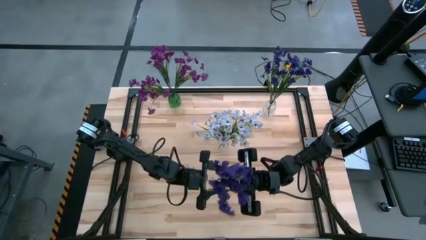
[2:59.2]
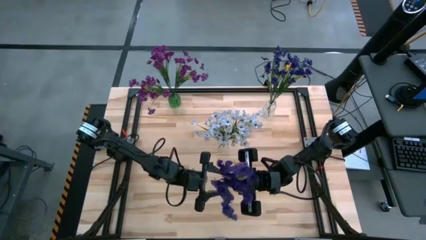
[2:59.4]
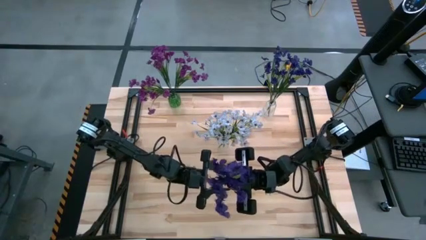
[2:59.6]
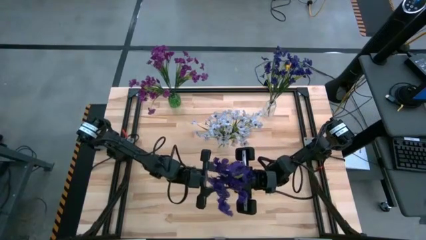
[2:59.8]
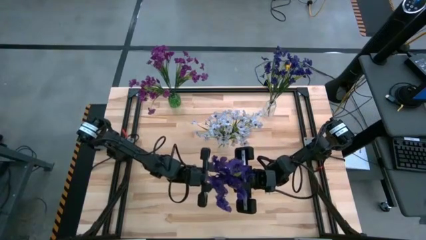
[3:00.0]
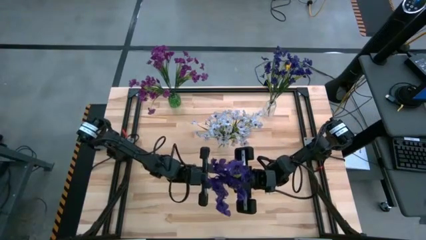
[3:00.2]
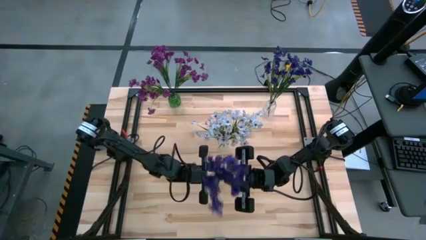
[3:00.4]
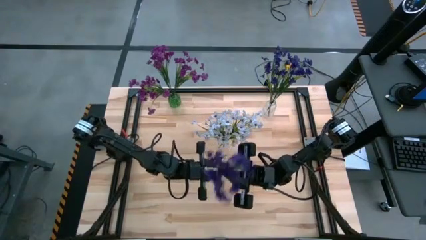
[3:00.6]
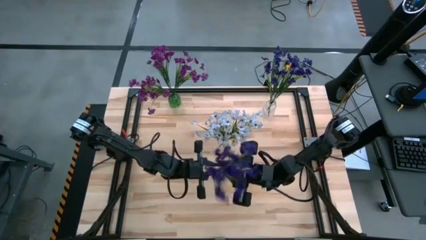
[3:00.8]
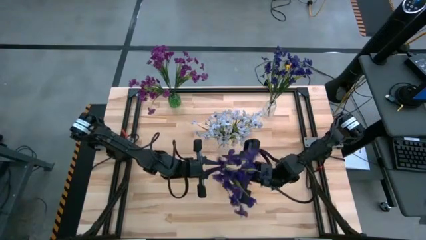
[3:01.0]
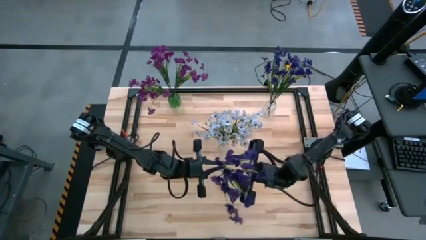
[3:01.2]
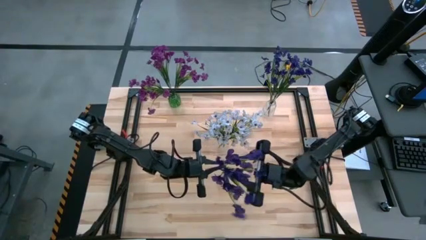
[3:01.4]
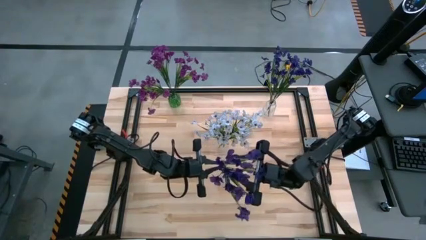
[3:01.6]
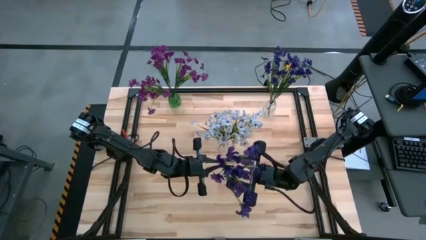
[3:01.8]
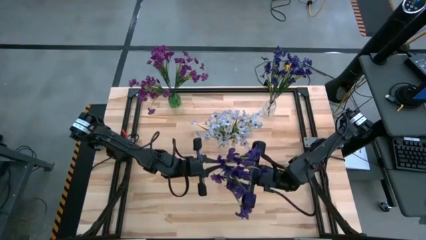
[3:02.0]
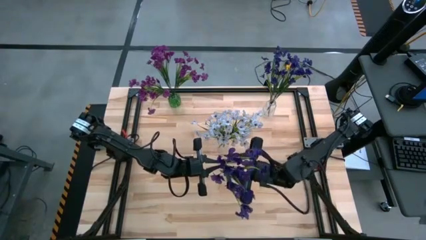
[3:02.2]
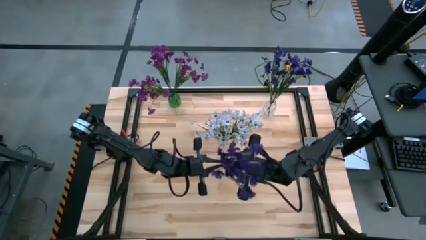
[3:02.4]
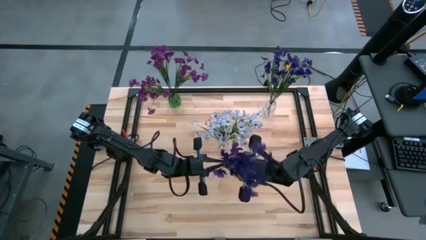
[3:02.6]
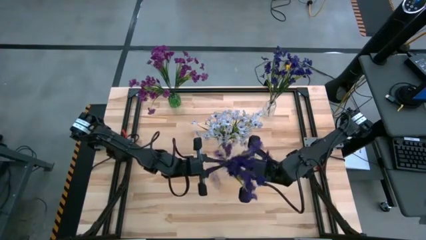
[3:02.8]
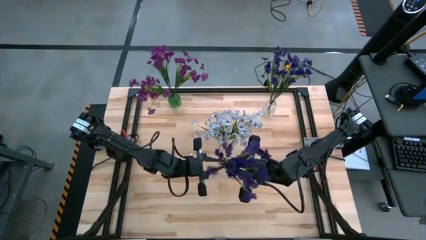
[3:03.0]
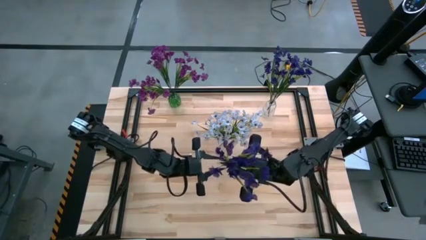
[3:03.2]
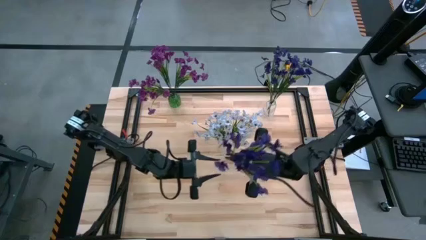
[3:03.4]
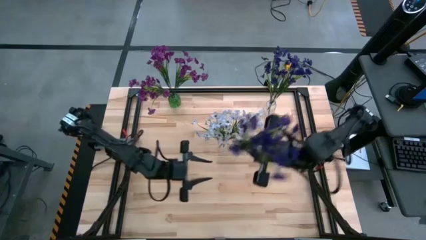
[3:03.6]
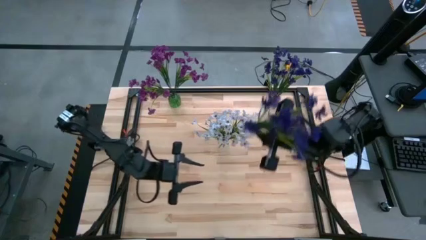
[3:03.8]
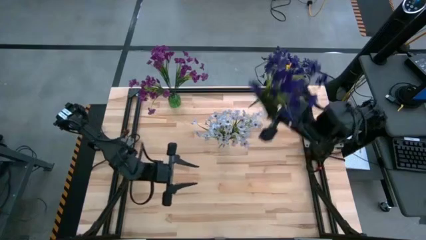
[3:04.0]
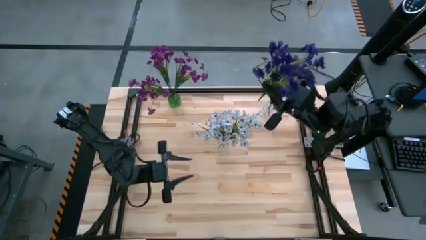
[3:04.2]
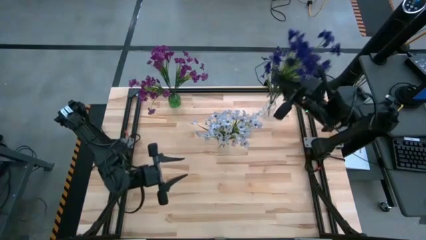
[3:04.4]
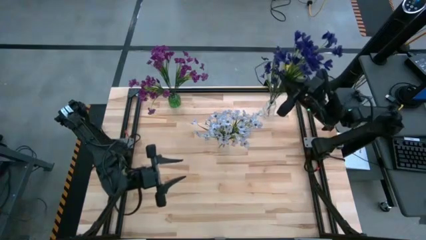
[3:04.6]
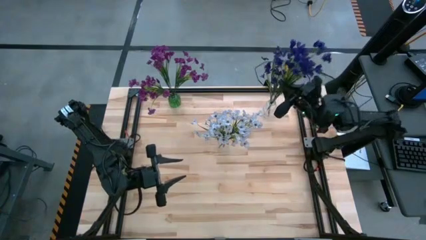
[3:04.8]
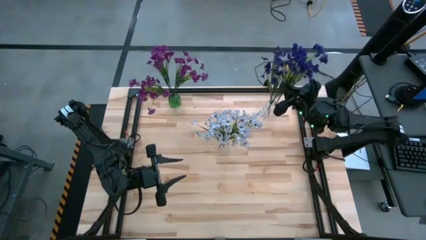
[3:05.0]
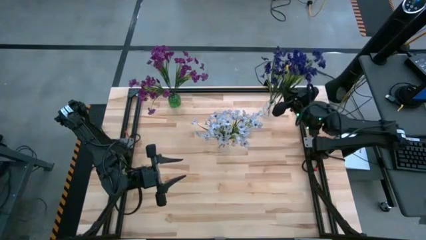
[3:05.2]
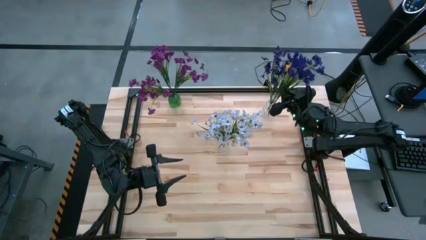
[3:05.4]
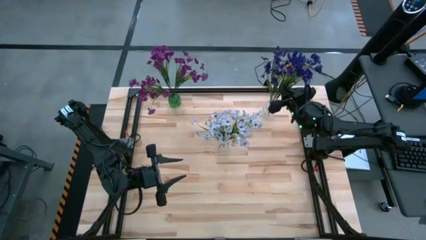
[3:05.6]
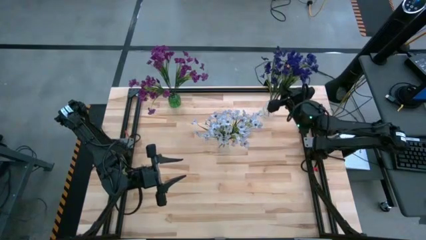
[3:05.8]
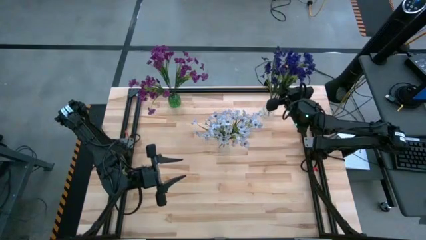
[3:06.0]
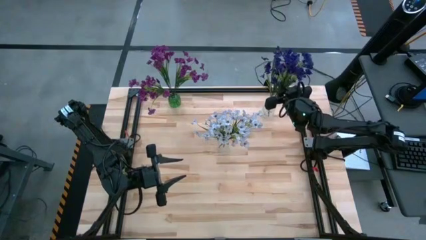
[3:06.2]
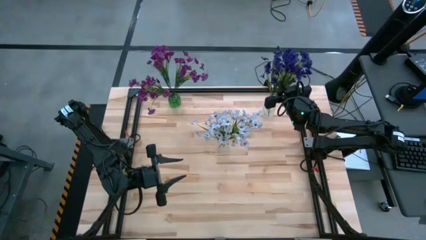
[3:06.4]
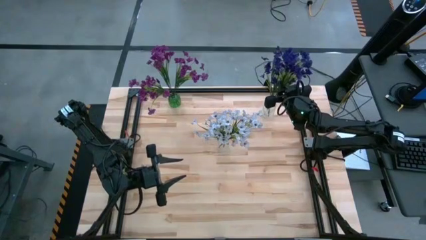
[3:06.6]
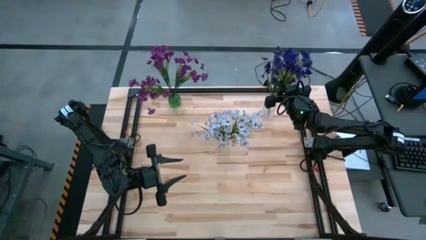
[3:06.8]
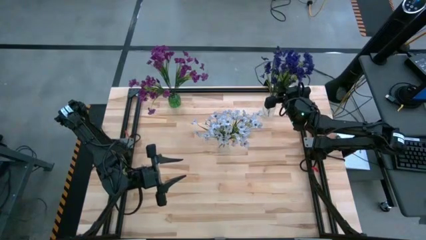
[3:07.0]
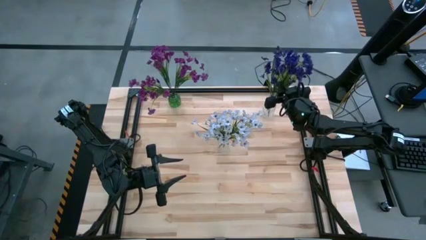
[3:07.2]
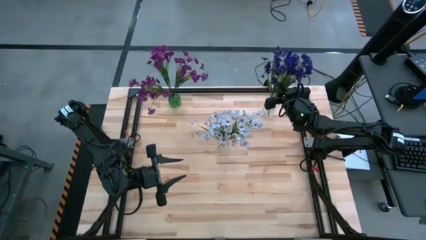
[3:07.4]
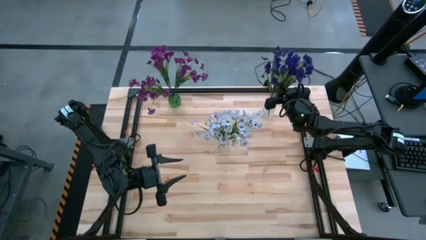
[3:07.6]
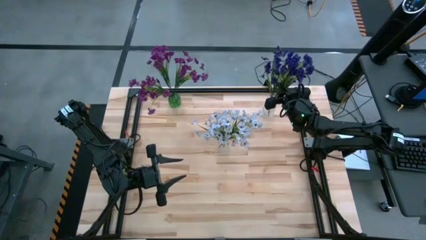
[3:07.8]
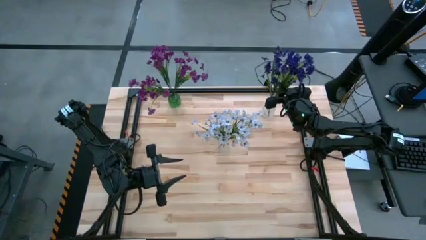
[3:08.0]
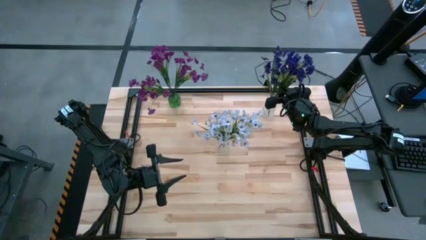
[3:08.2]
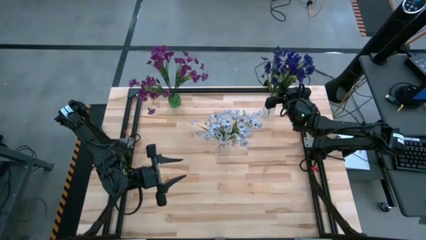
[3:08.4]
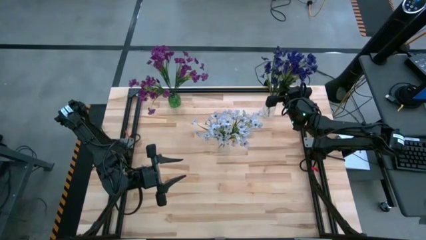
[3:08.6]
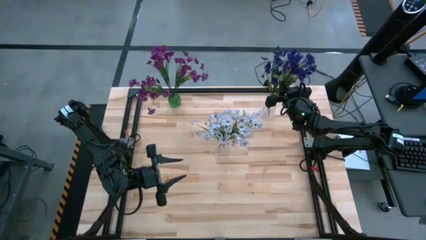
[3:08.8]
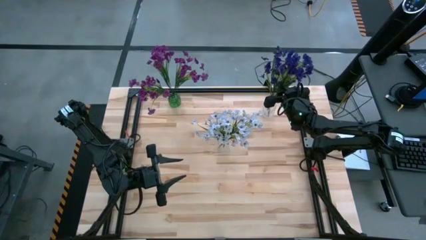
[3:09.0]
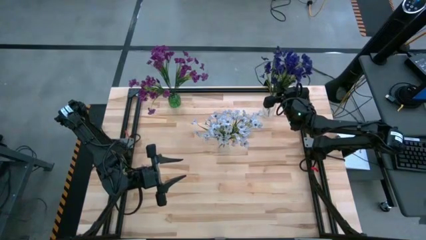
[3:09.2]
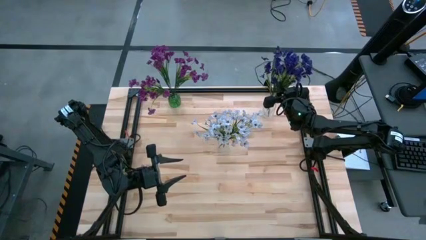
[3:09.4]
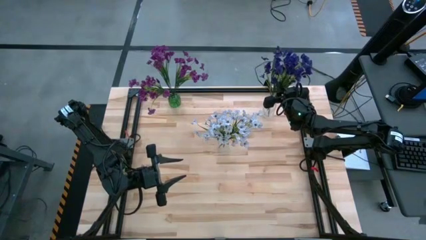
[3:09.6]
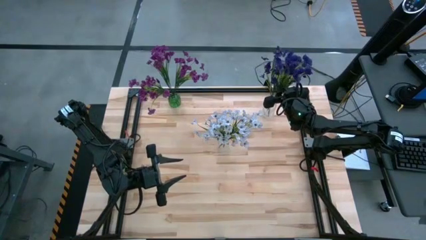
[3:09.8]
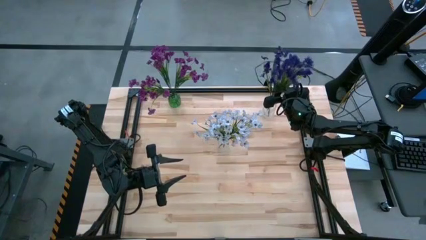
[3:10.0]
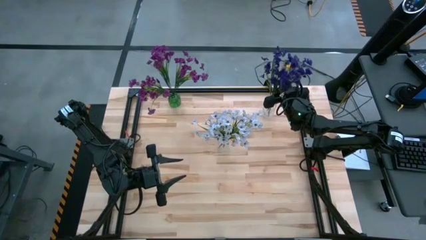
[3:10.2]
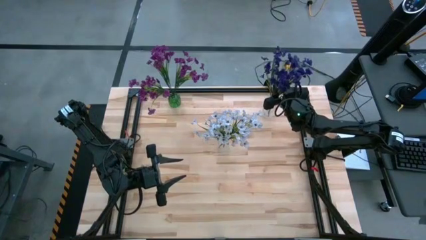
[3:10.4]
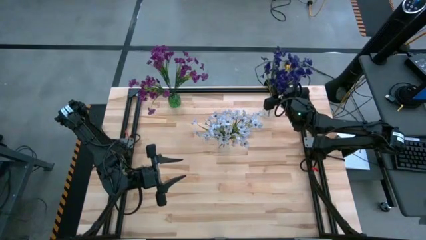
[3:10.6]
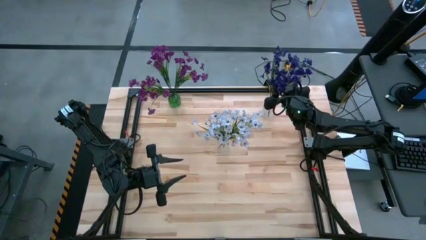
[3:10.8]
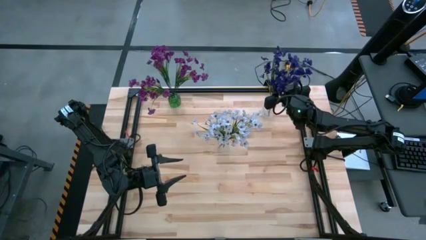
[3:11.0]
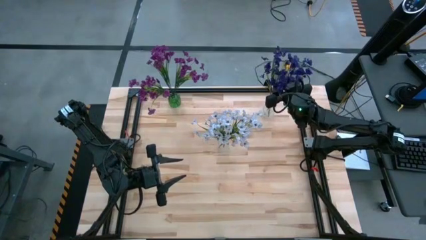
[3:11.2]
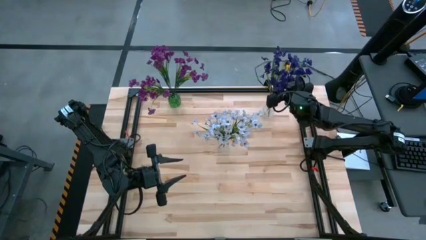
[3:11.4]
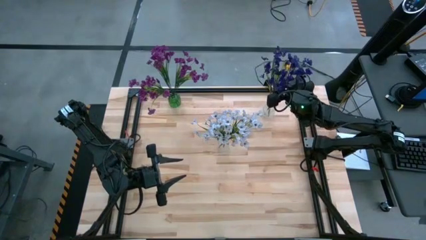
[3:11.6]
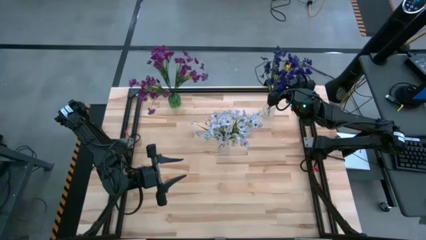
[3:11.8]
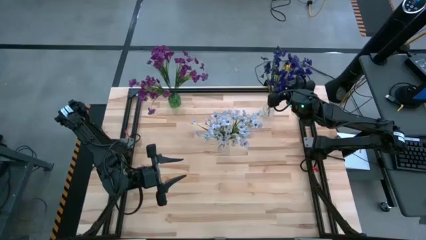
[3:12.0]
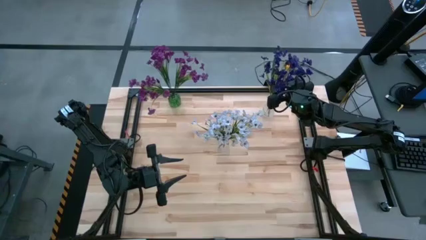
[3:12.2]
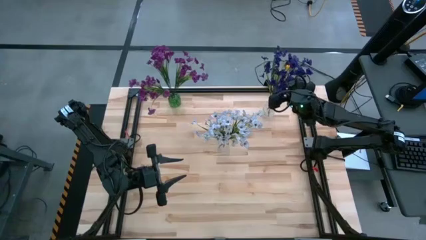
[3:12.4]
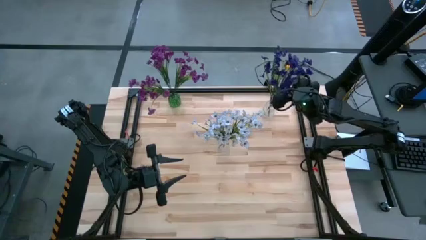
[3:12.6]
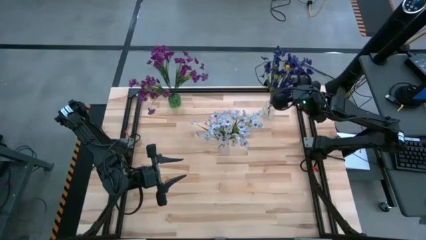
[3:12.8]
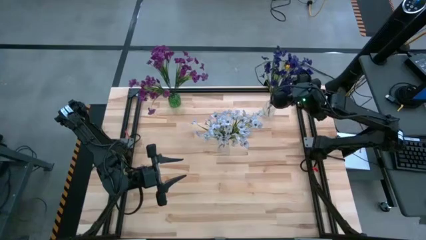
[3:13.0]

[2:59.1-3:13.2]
Task: Sort flowers into vase by color
Put the blue flowers into the top transparent flower vase
